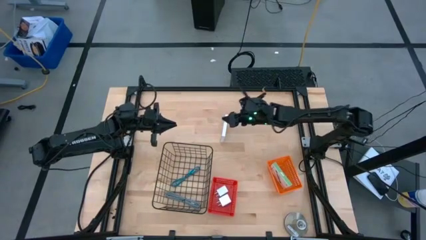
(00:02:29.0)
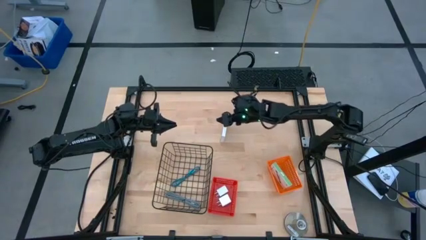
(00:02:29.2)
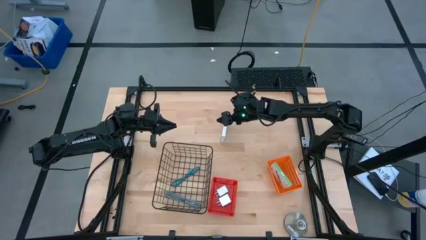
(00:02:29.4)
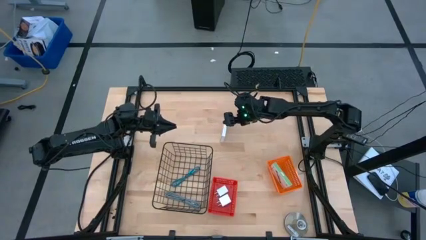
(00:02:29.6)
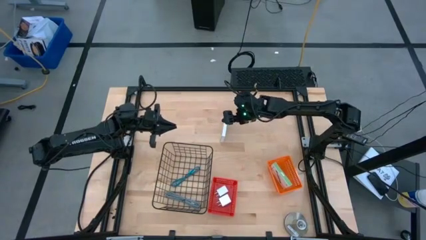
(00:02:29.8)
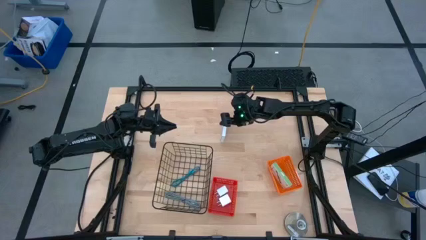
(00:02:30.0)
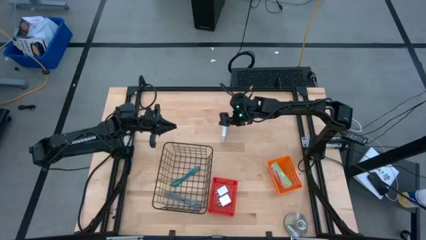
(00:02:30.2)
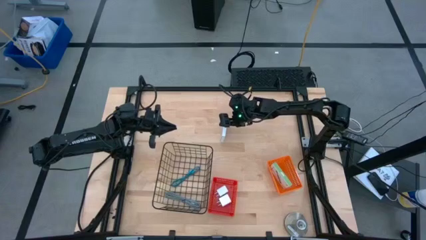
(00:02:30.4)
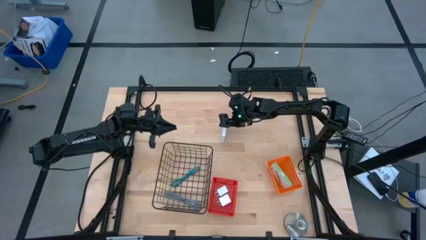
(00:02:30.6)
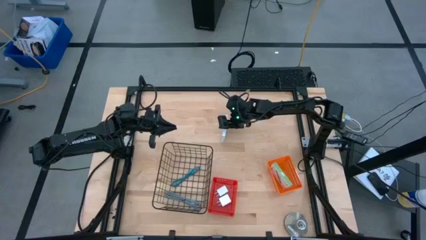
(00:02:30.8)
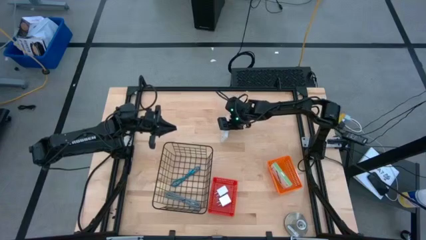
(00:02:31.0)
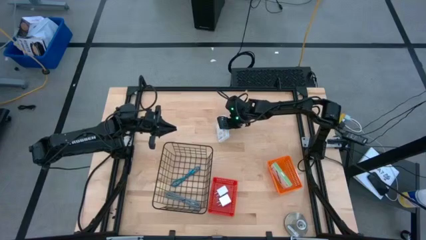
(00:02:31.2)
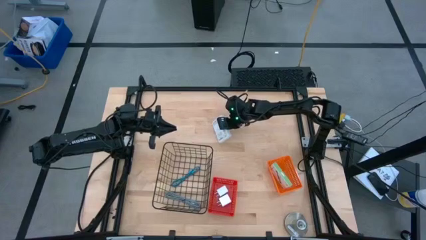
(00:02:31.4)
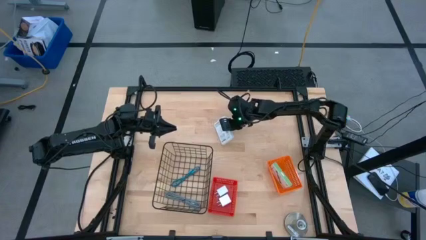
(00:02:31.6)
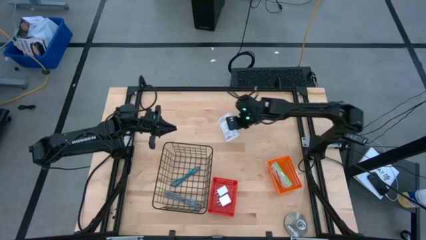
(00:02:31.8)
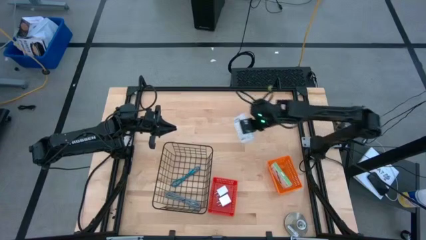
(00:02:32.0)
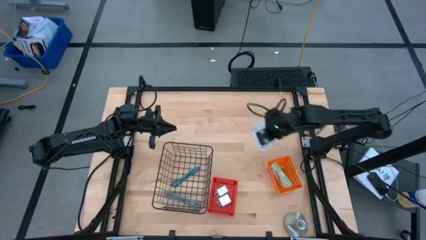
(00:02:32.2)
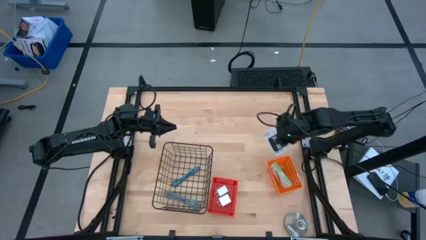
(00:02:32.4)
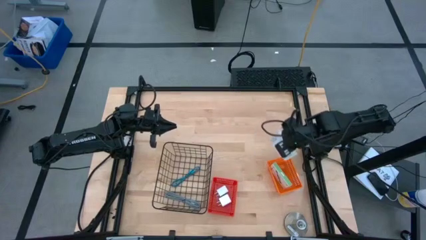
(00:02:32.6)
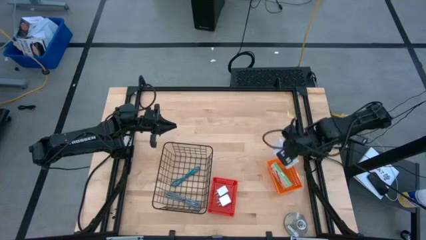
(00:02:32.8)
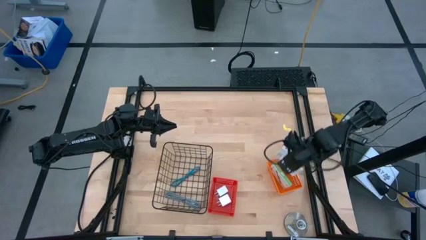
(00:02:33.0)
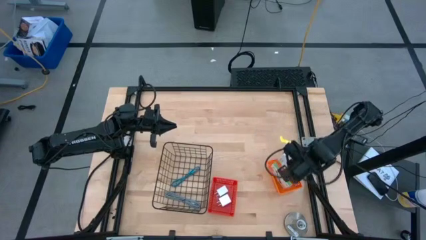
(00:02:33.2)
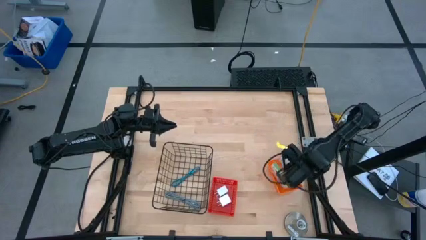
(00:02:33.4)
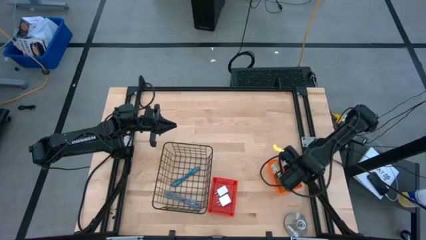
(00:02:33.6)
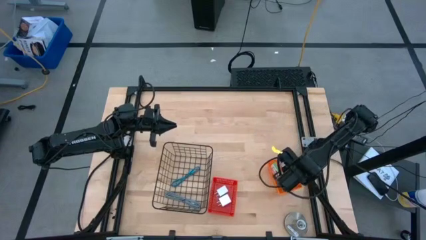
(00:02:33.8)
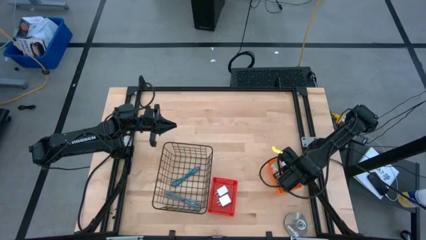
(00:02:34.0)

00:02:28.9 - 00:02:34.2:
Task: Pick and place items into bin
Put the card reader box into the orange basket

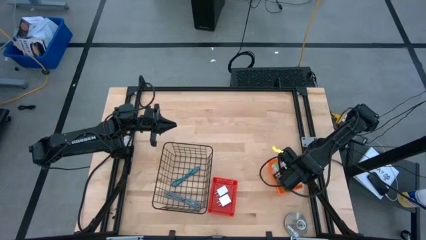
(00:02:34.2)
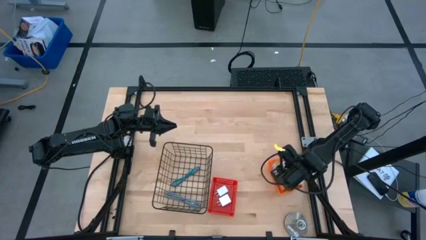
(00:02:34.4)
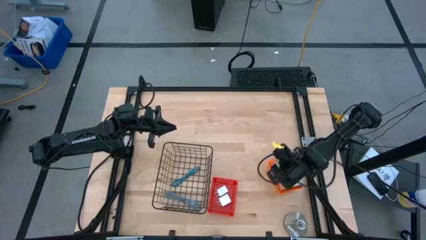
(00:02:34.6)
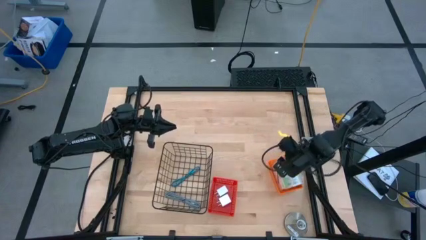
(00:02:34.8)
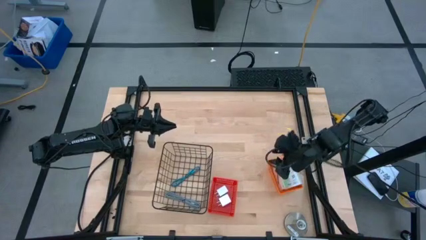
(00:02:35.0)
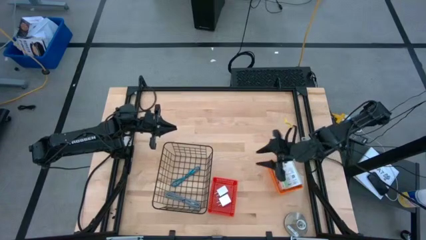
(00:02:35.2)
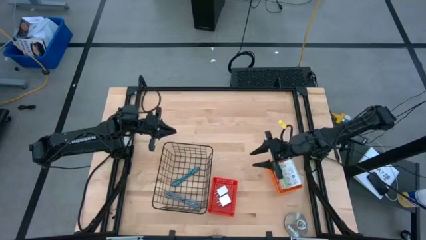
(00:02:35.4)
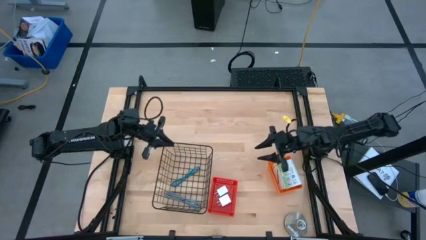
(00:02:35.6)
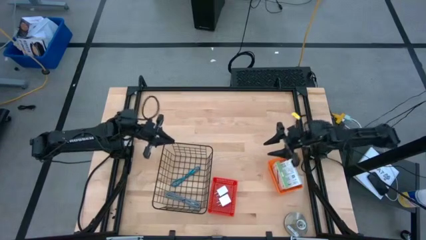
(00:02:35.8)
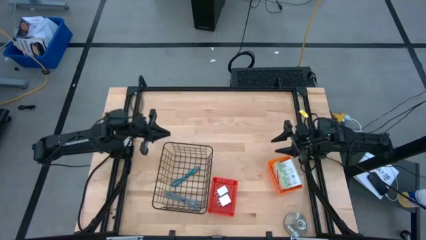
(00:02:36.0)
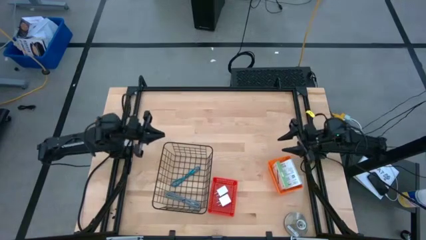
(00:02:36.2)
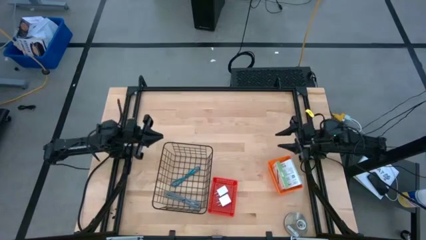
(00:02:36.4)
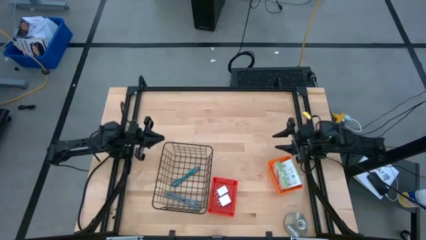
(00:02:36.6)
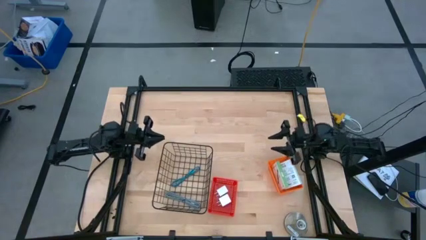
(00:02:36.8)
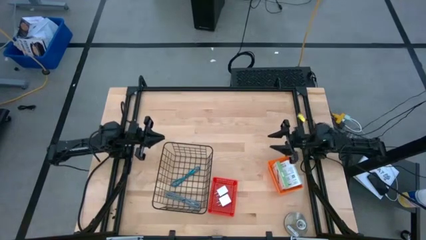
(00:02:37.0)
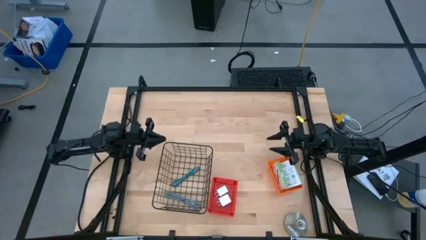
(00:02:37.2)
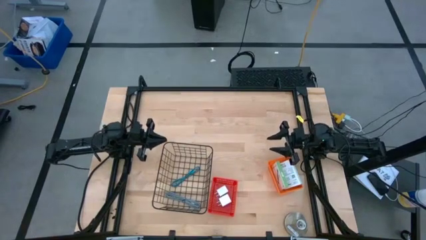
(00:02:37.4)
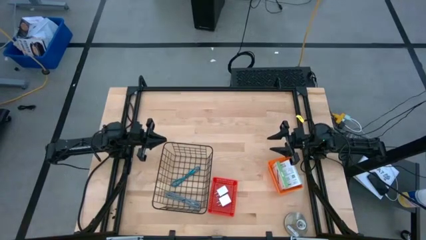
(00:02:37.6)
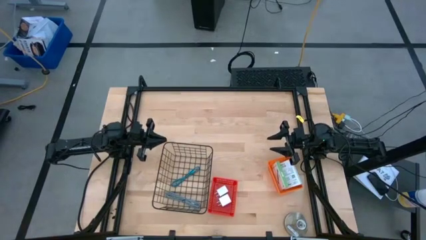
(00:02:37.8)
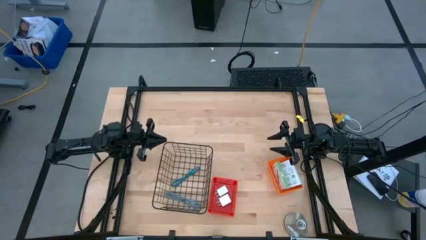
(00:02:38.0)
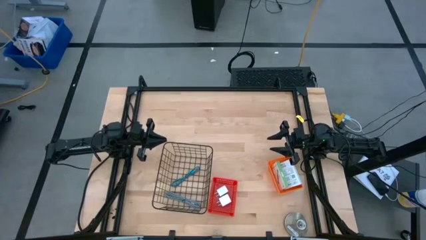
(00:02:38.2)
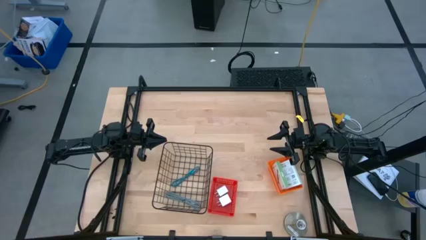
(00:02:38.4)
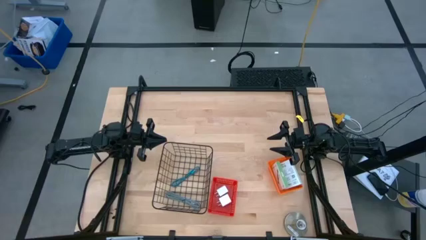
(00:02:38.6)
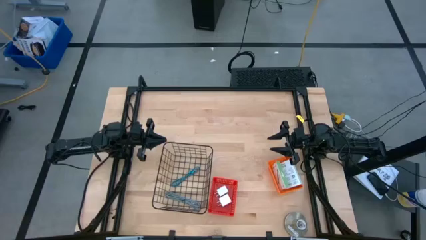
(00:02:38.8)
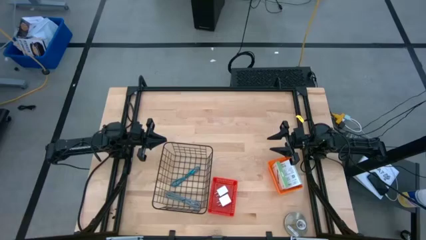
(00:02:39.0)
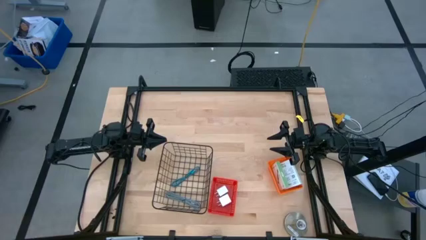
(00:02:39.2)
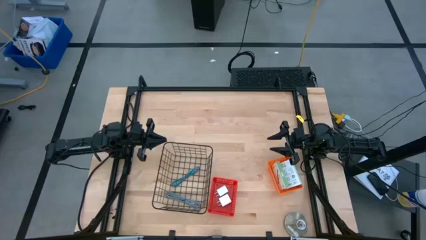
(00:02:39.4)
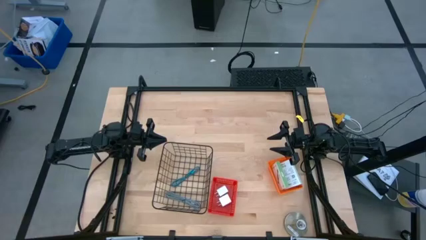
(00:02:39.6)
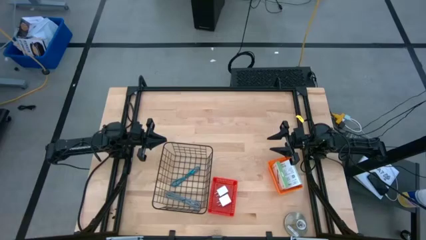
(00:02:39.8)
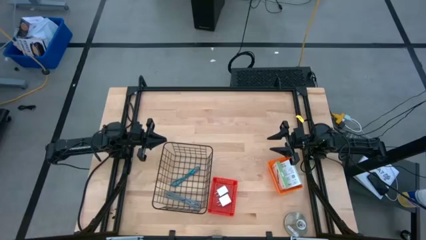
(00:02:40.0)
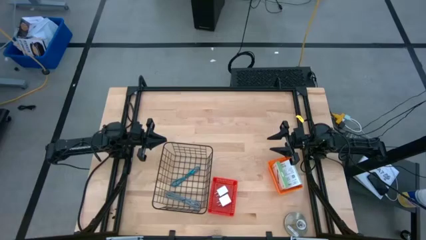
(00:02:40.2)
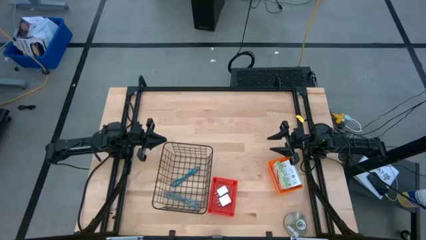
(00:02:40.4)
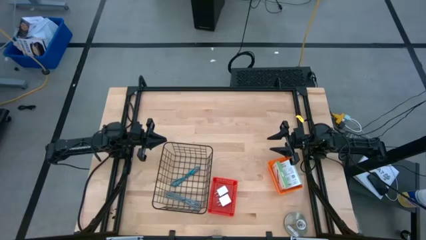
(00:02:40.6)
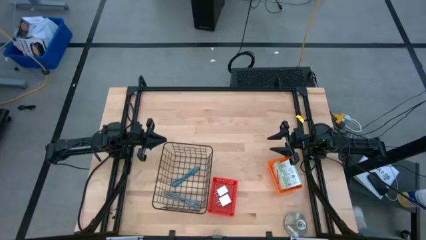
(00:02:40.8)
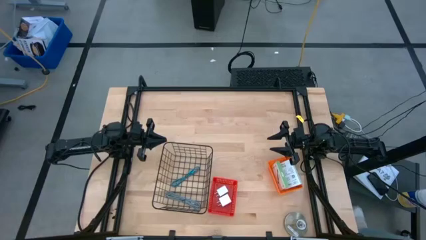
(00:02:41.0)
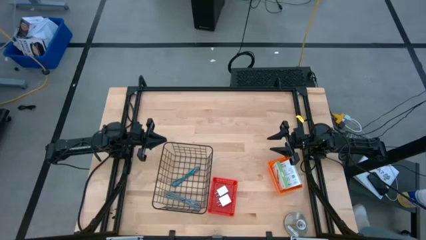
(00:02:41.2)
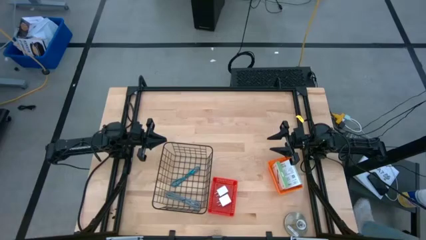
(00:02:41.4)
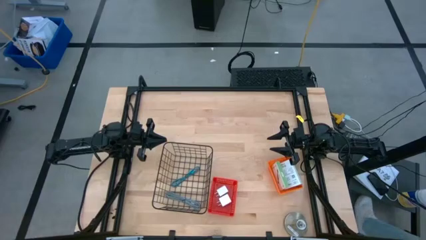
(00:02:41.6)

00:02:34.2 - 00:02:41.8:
Return to Home Position

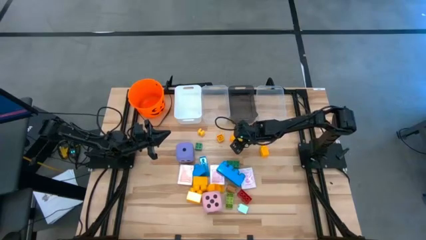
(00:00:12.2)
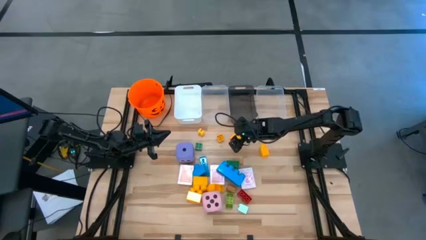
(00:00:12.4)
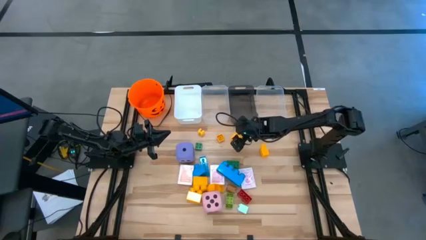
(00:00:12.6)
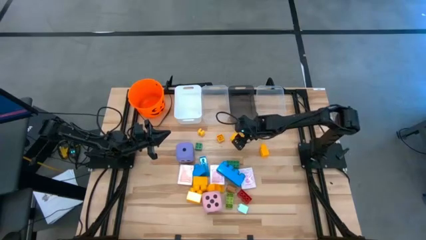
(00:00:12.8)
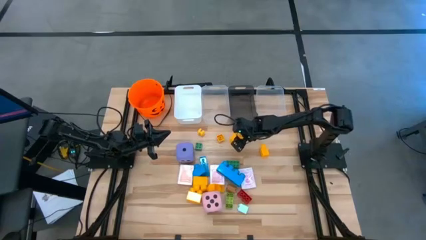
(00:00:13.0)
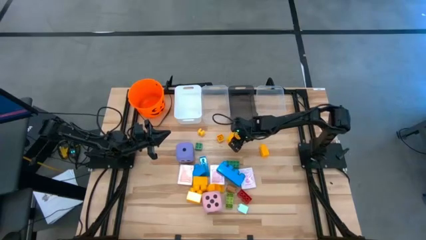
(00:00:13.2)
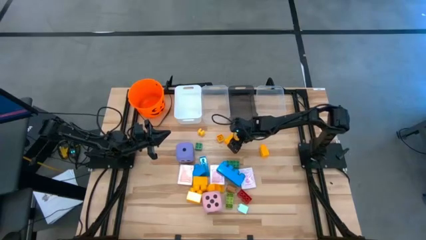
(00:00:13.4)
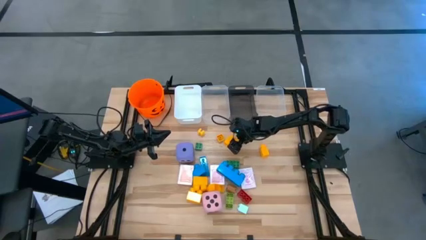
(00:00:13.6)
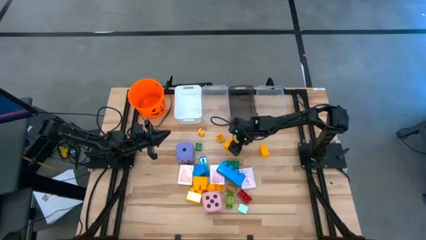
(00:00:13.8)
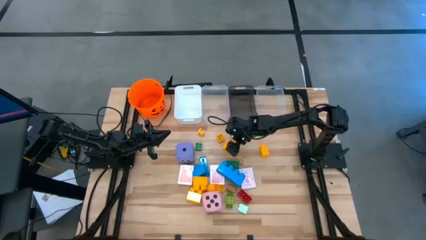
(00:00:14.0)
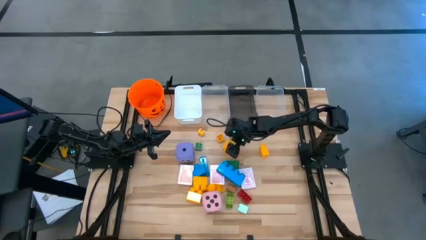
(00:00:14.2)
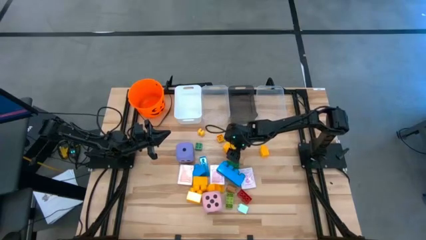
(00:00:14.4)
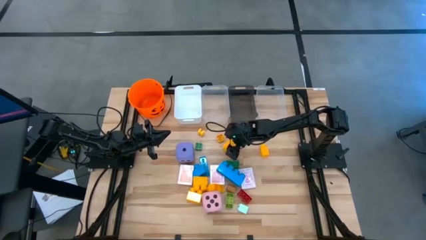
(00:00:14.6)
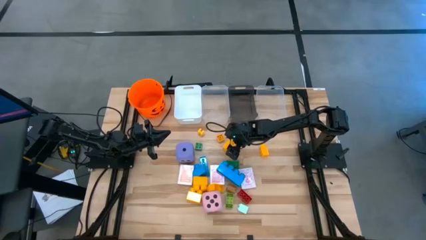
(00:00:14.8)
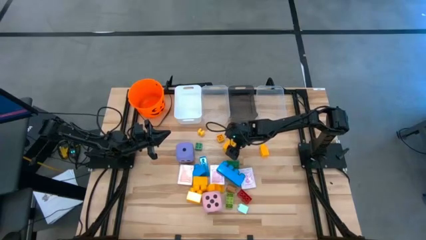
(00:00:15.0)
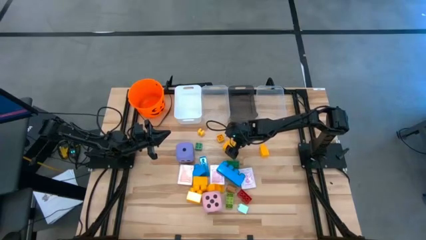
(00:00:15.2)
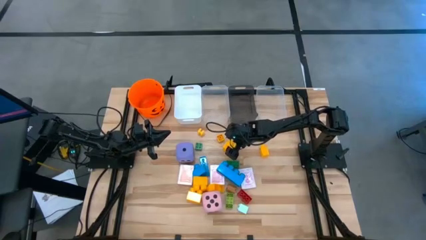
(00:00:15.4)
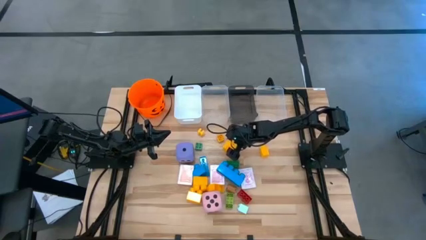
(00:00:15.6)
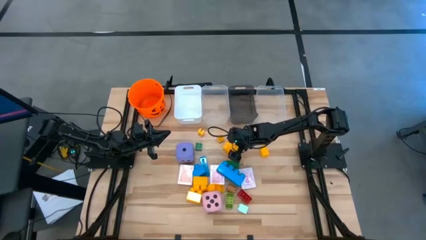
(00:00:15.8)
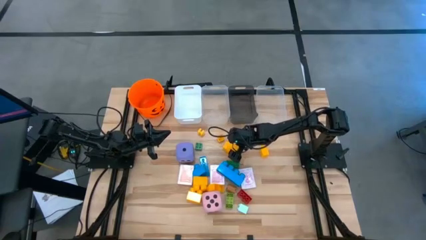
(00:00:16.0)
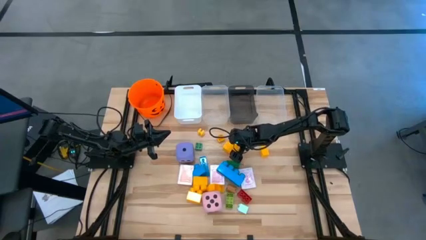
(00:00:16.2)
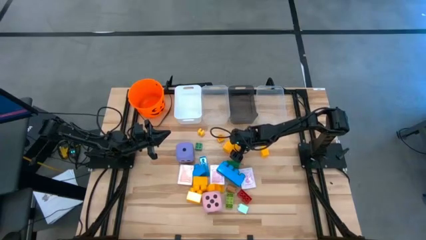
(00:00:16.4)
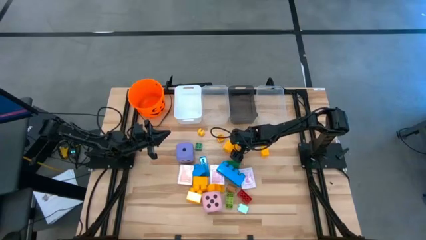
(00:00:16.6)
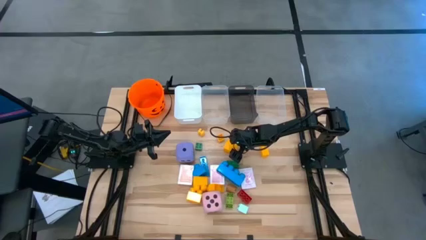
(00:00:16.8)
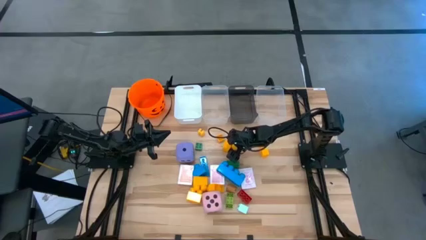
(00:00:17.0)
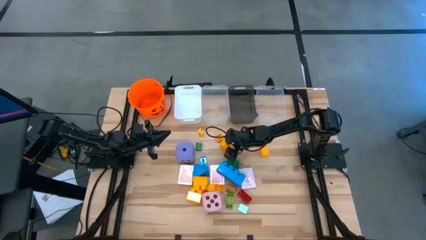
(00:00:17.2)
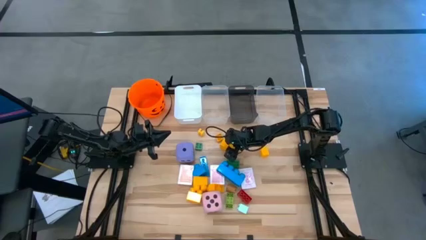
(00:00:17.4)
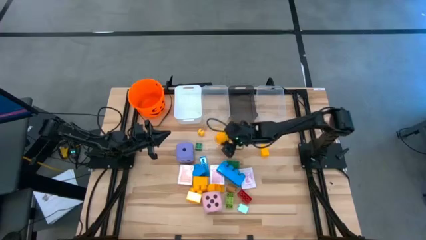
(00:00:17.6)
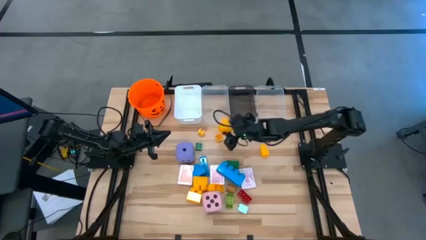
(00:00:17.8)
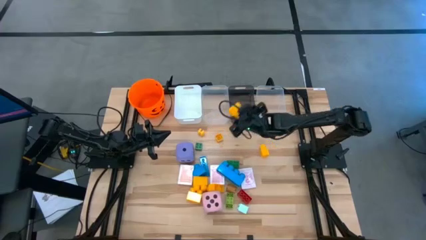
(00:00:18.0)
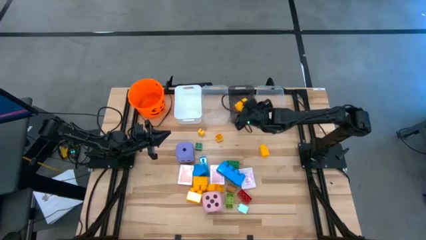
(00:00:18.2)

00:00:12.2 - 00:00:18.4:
Task: Pick & Place Toys
Put the large yellow game piece into the black bin
